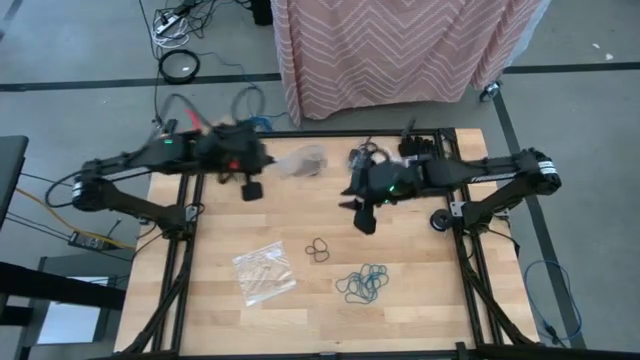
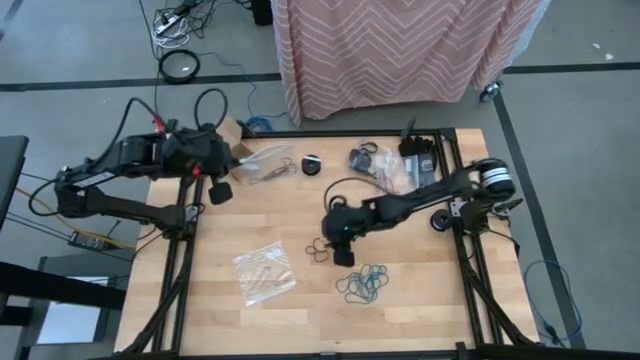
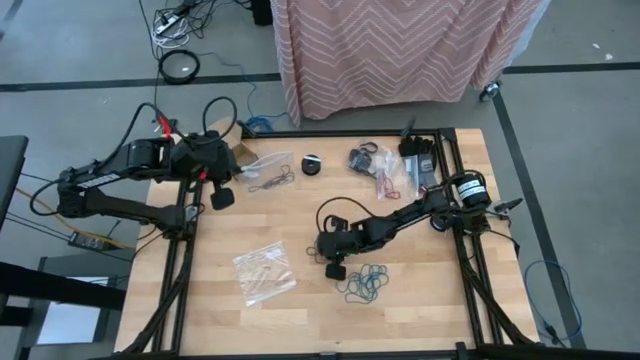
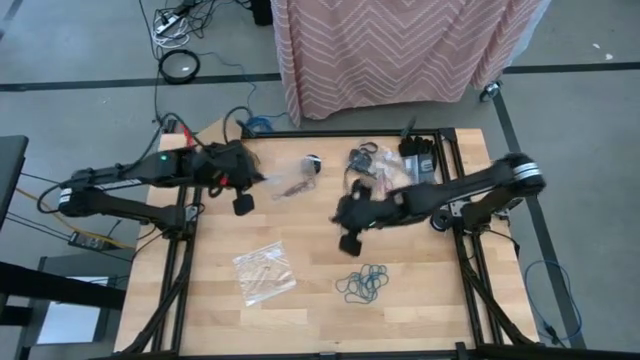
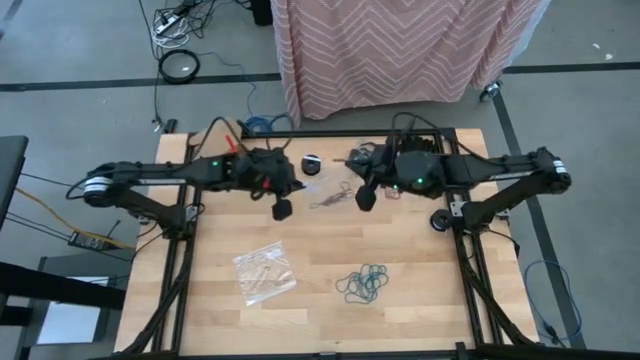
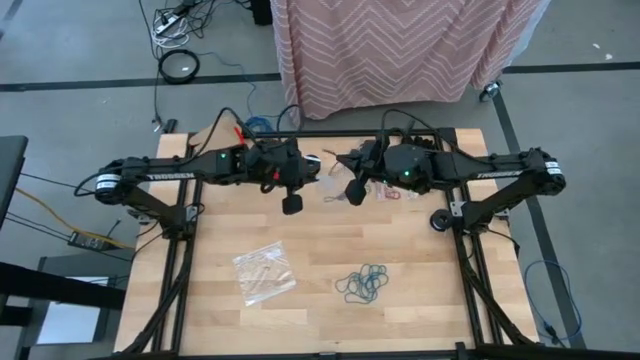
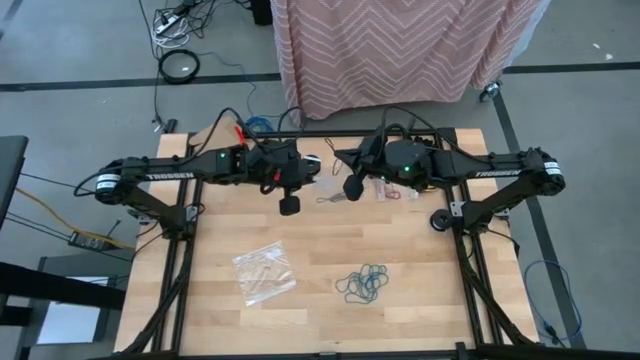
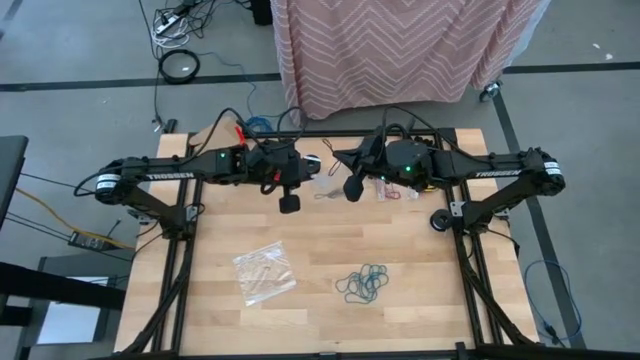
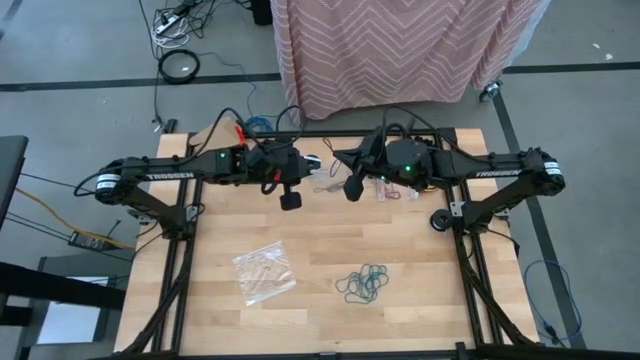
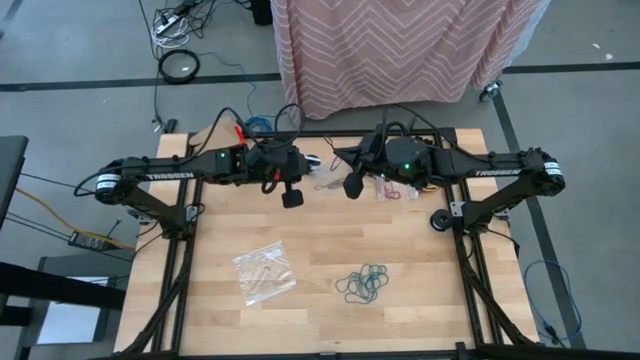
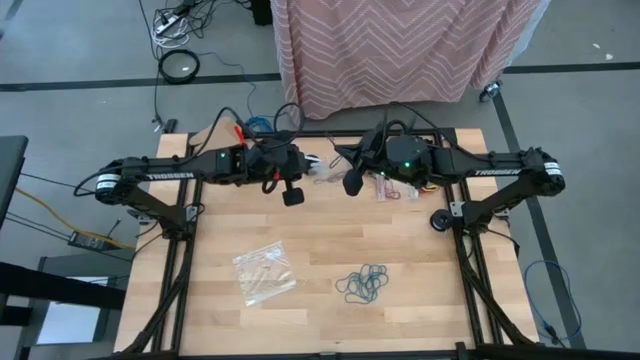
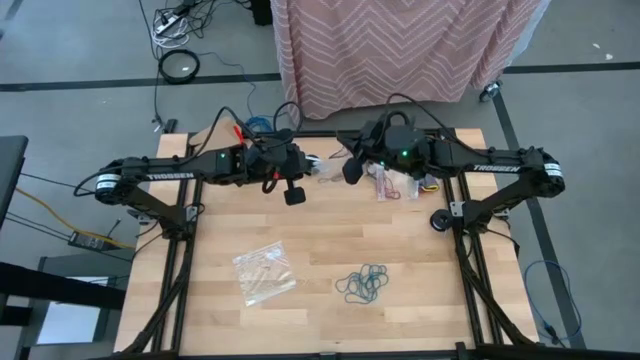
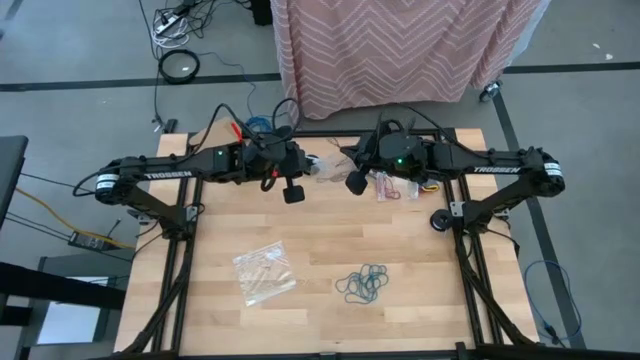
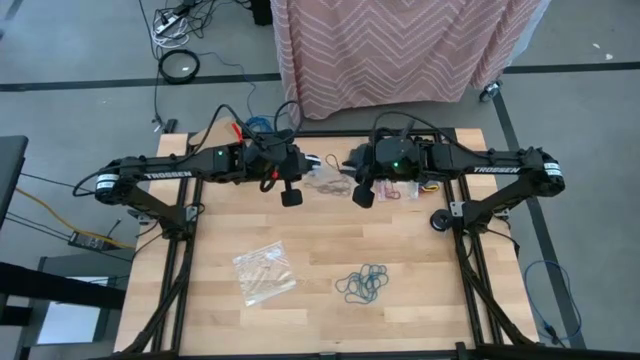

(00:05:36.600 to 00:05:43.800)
Task: Sort rubber bands
Put the violet rubber band into the transparent bag

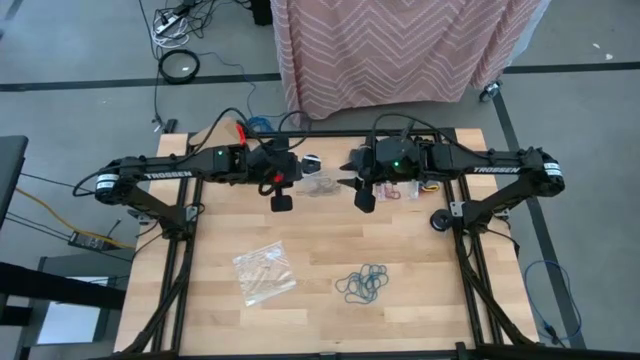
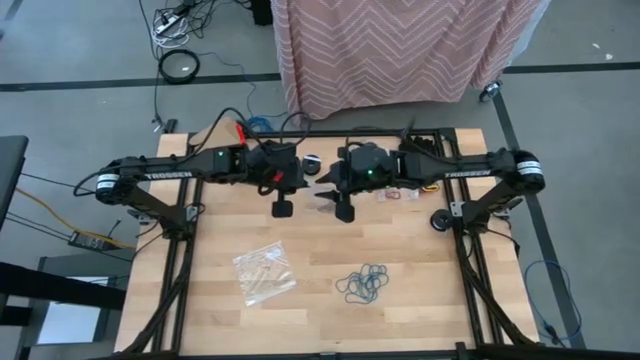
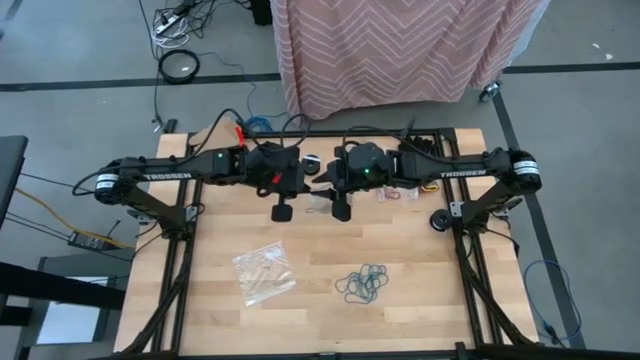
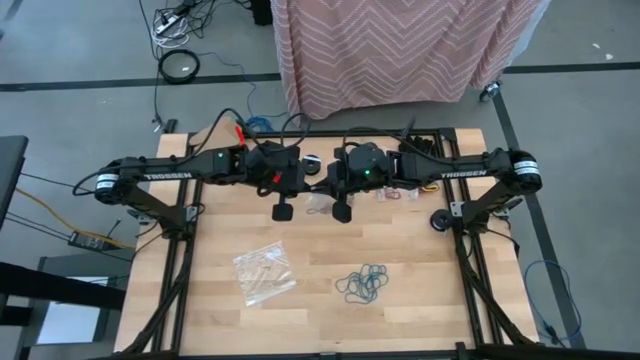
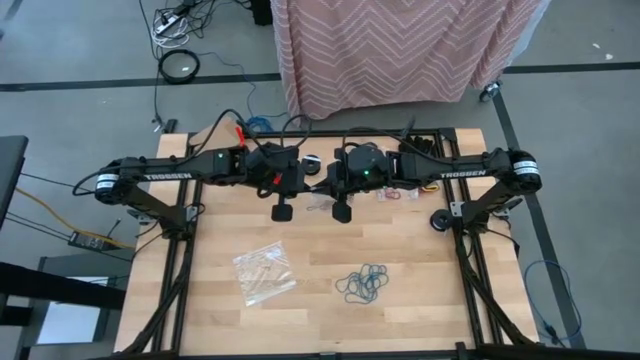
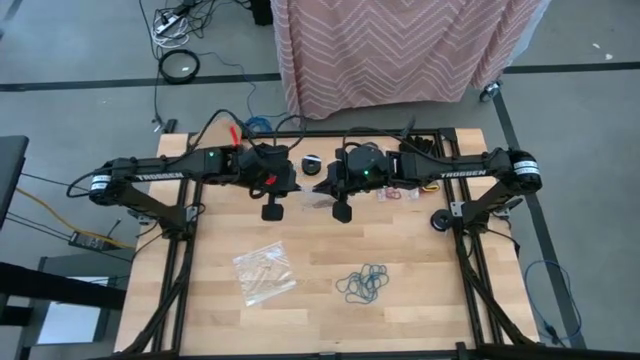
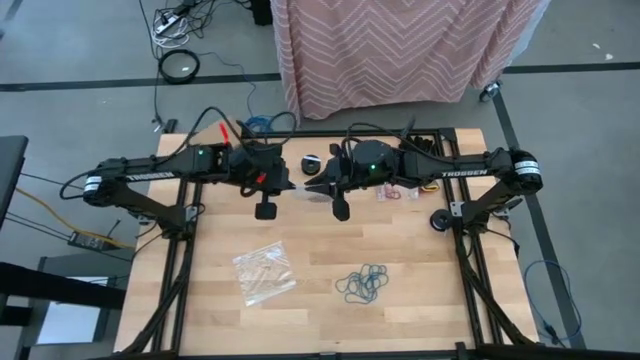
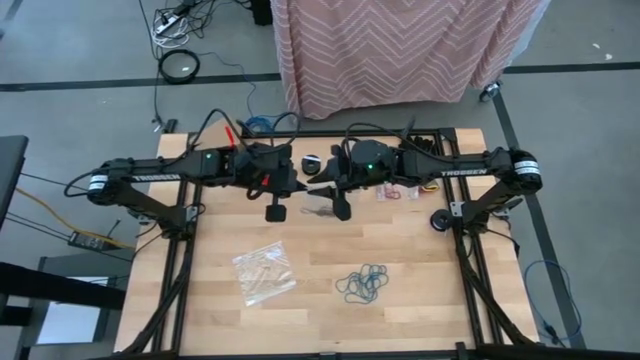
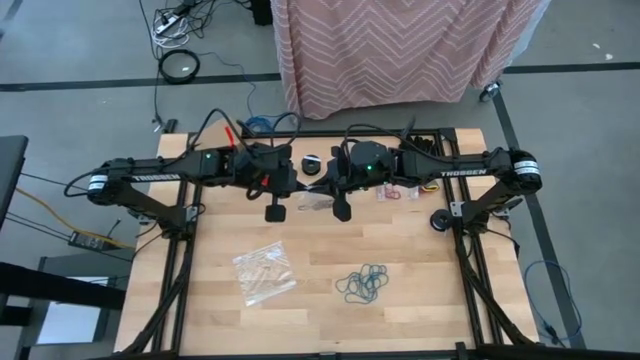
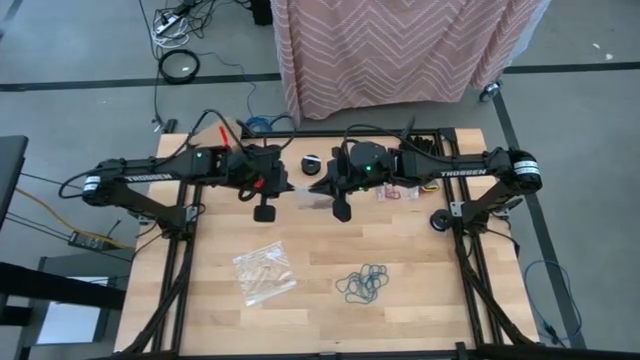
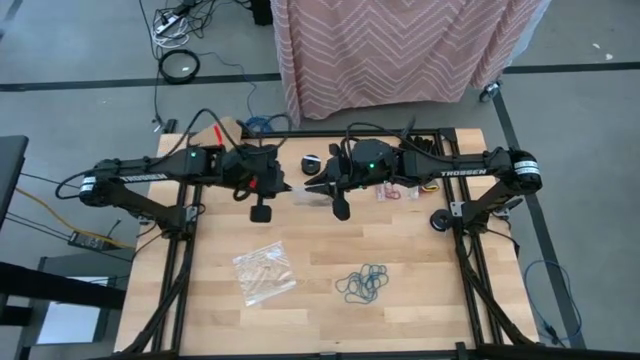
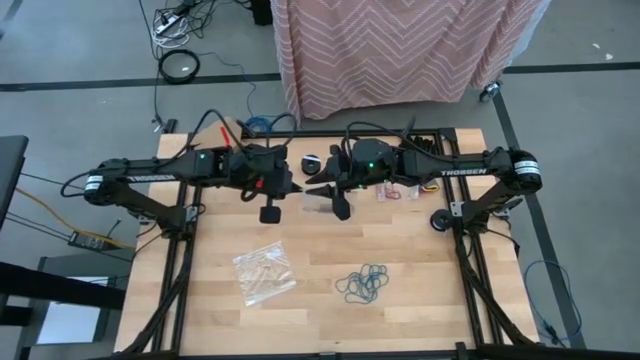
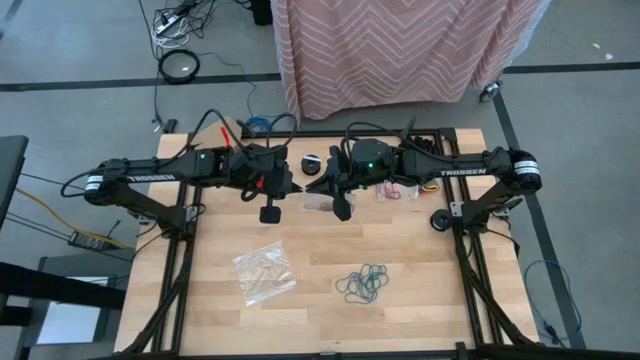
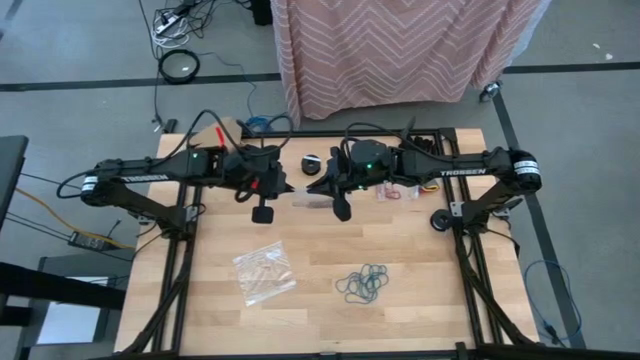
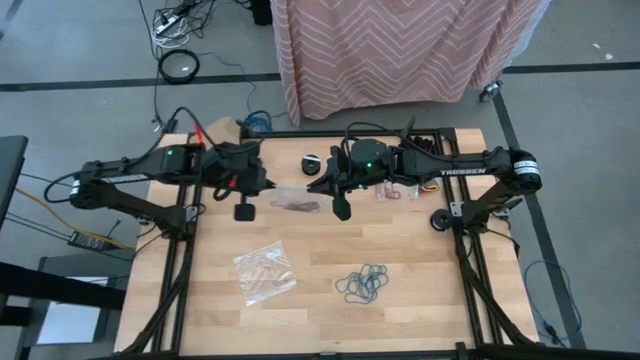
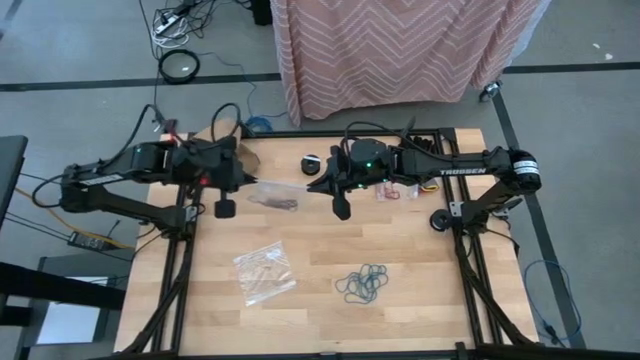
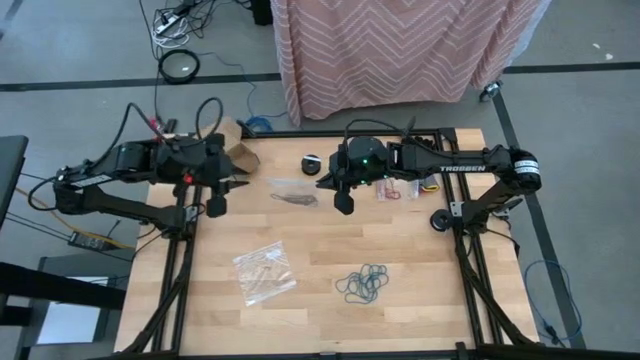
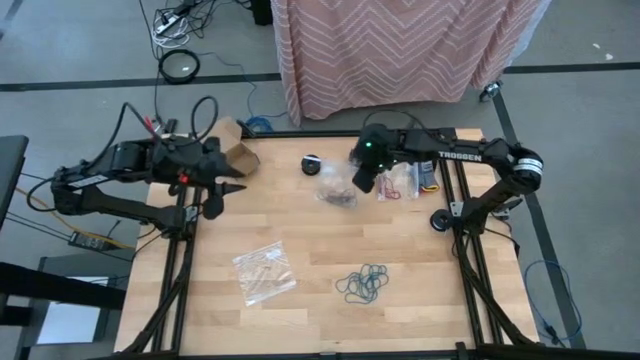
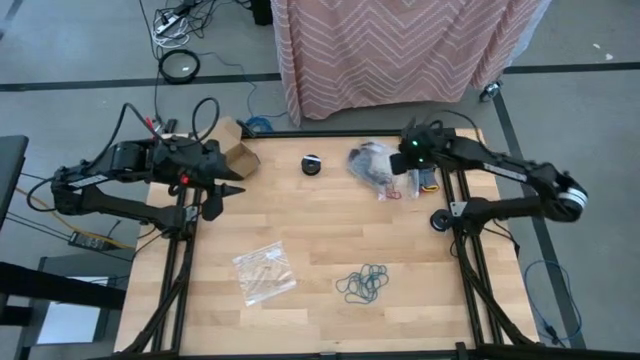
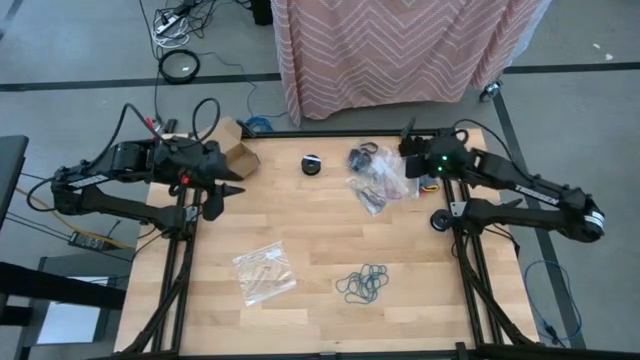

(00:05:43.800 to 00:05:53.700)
Close the transparent zip bag

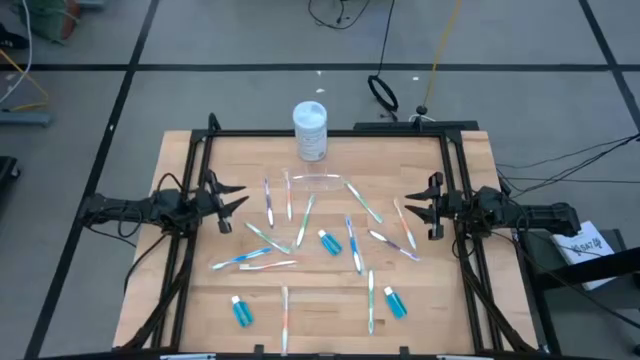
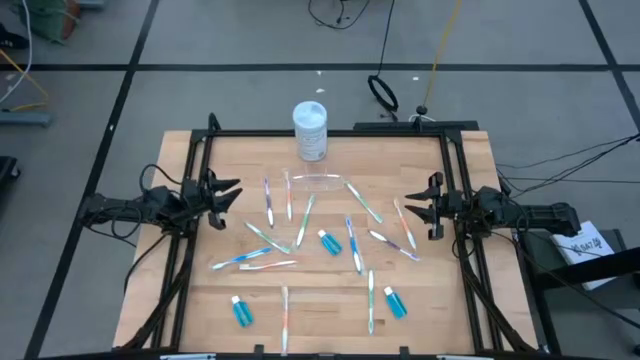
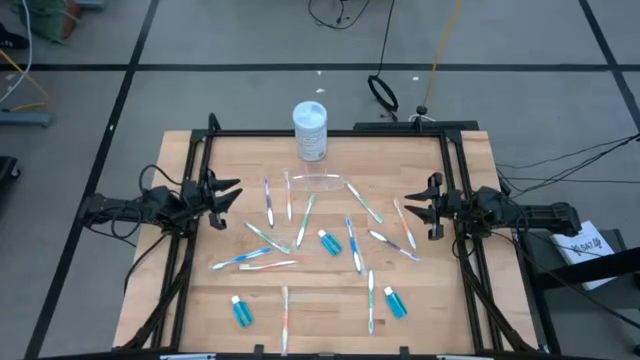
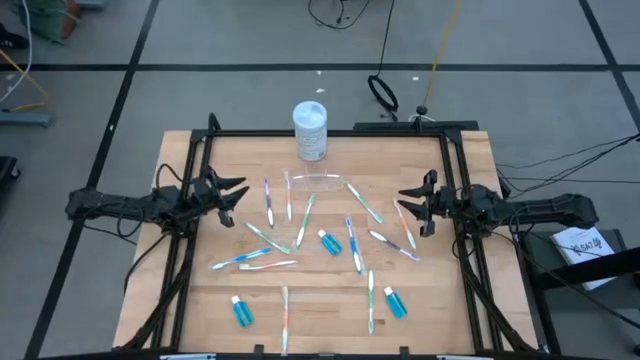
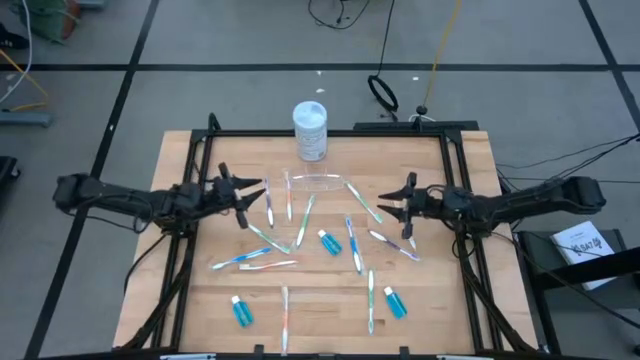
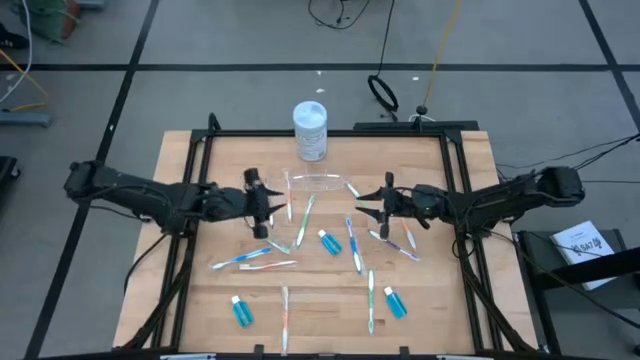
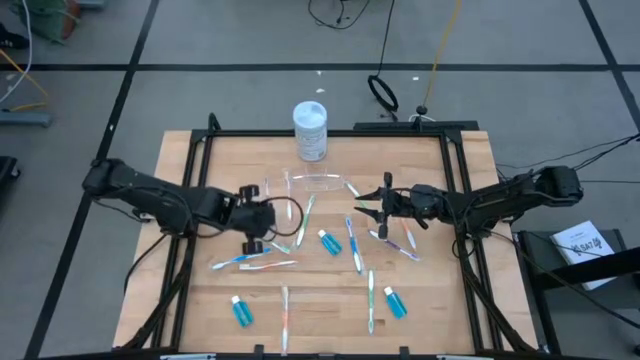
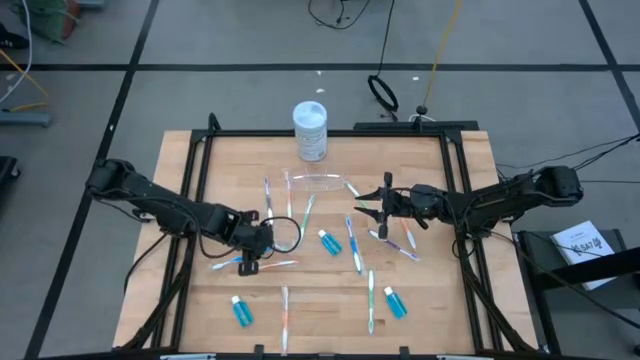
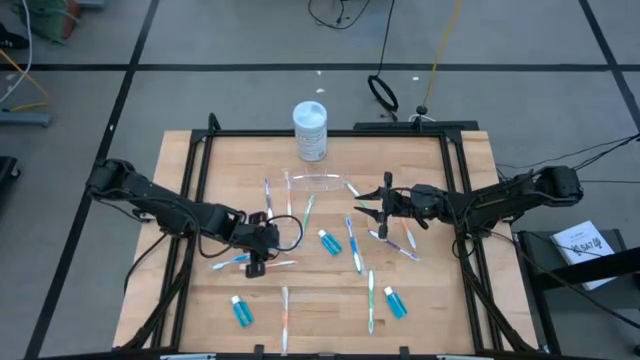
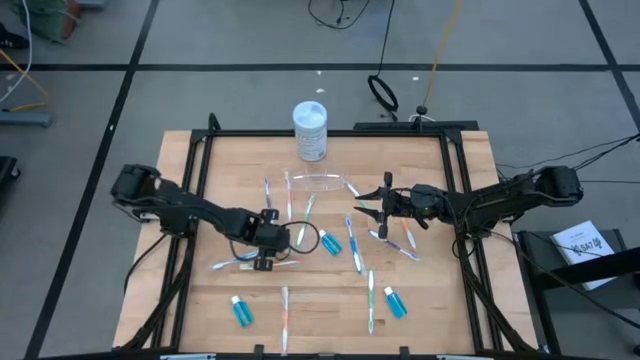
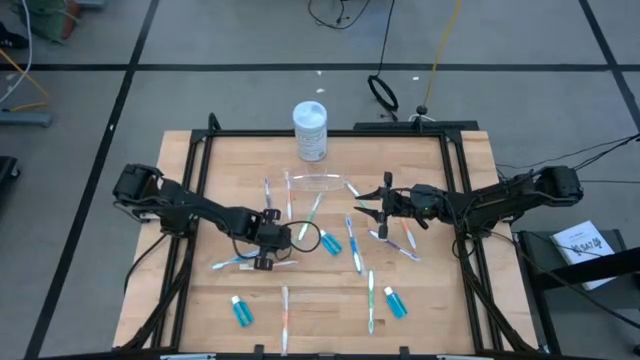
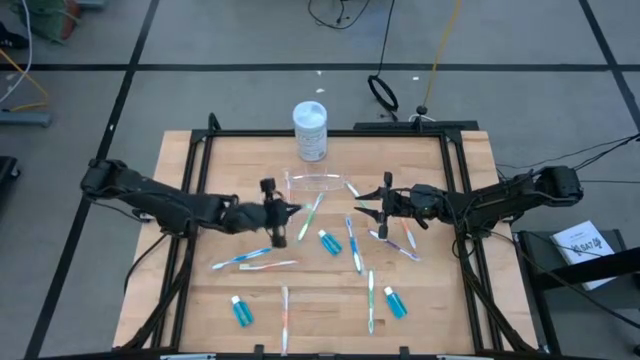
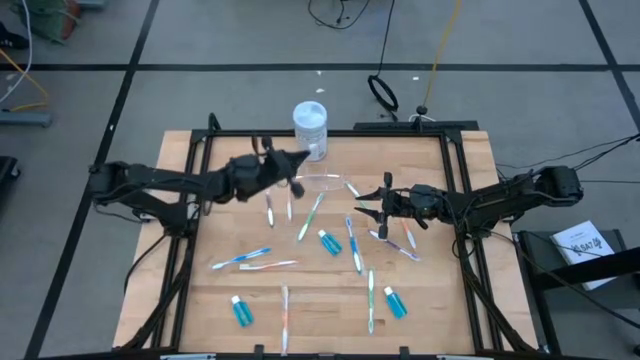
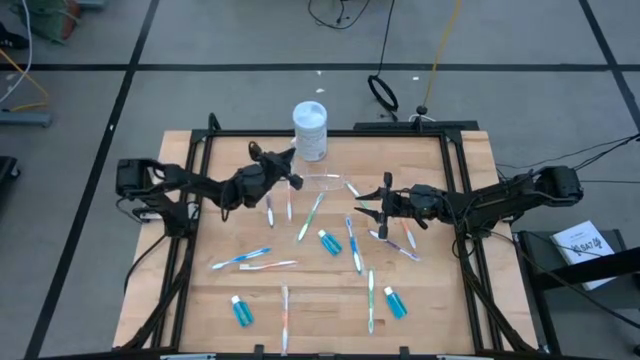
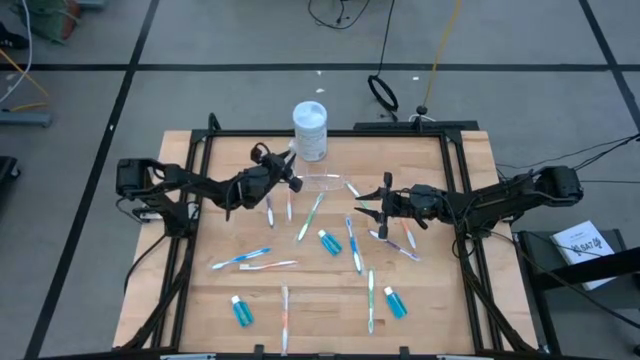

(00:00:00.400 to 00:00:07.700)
Task: Pick & Place toothbrushing station
Put the green toothbrush into the transparent organizer
